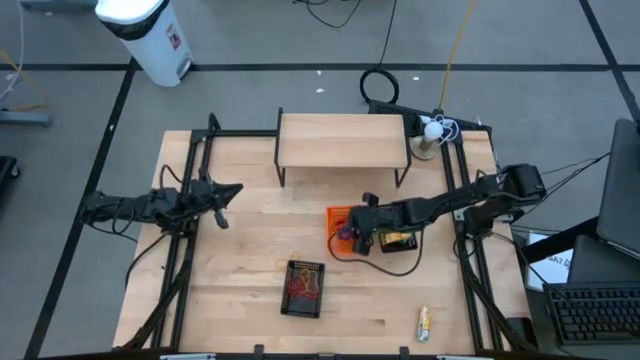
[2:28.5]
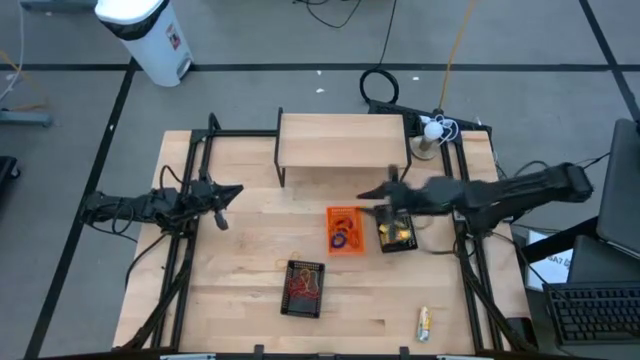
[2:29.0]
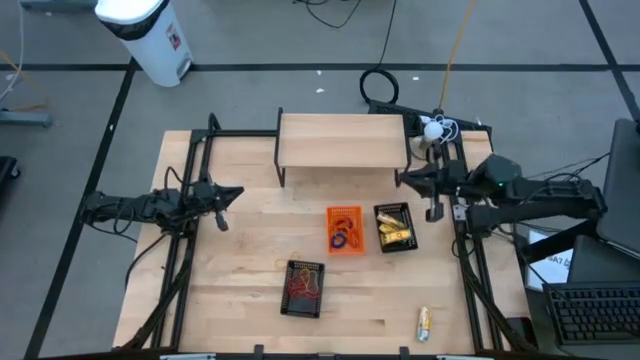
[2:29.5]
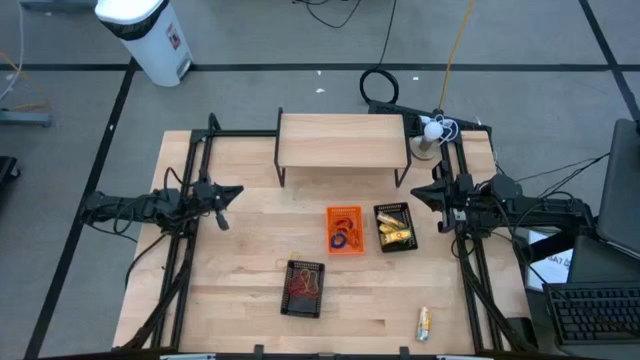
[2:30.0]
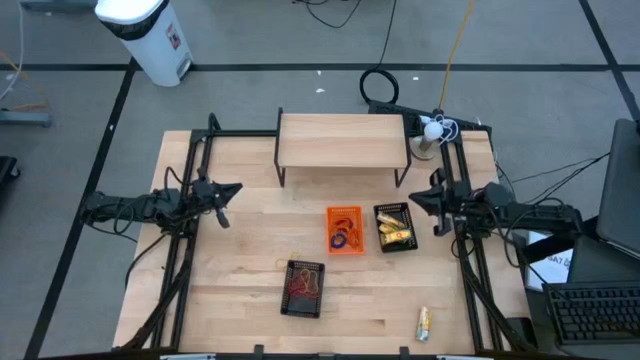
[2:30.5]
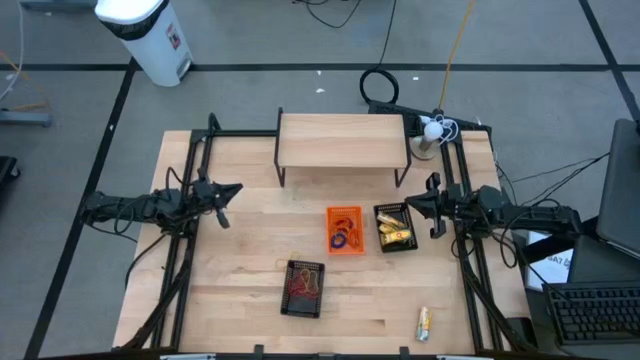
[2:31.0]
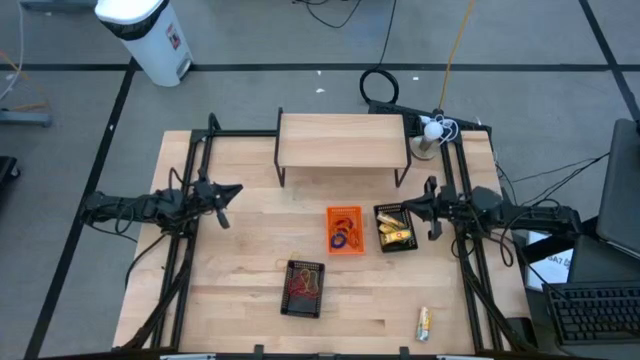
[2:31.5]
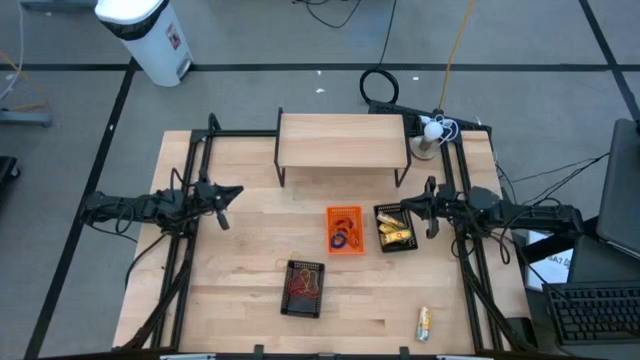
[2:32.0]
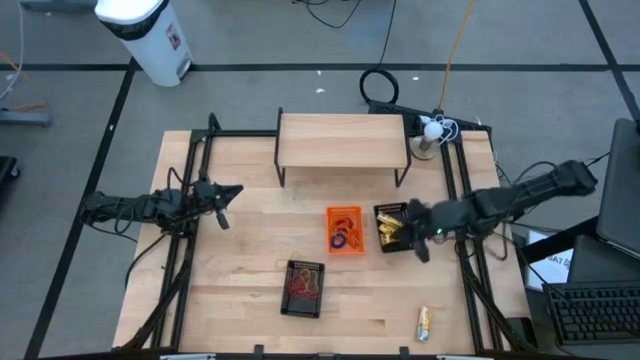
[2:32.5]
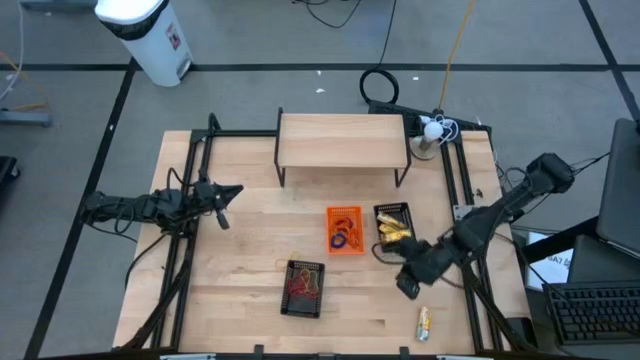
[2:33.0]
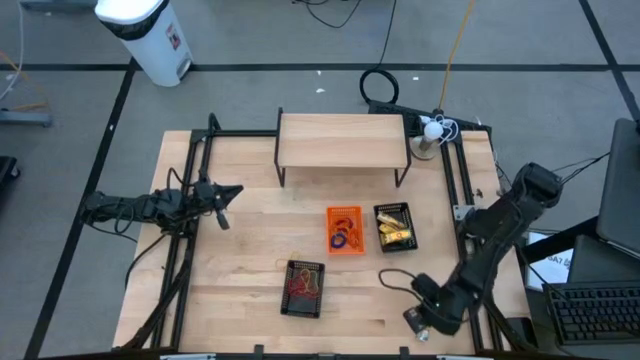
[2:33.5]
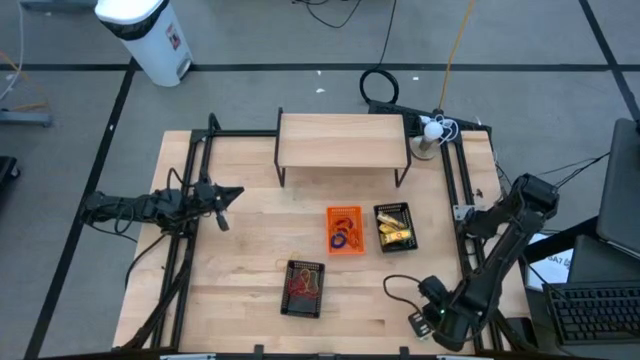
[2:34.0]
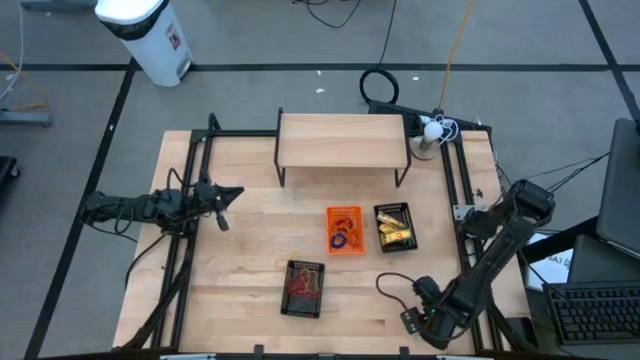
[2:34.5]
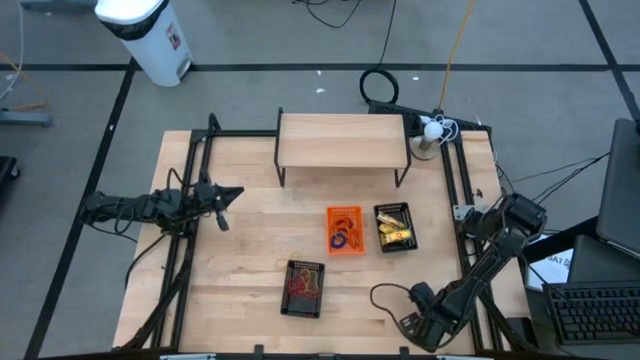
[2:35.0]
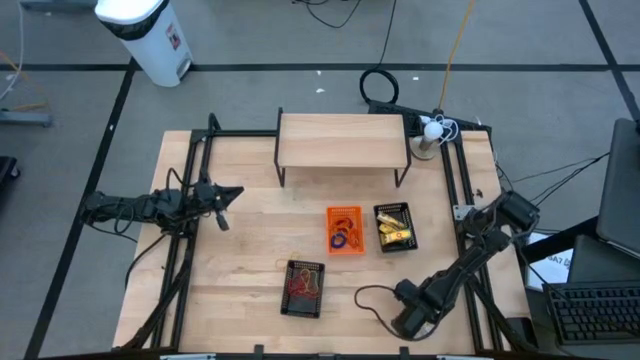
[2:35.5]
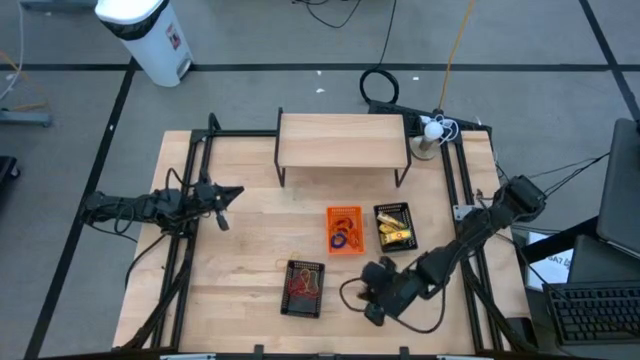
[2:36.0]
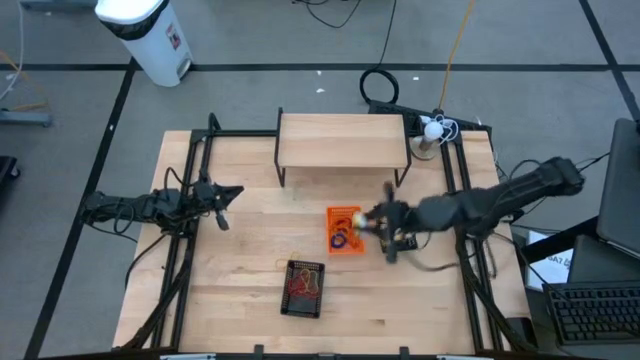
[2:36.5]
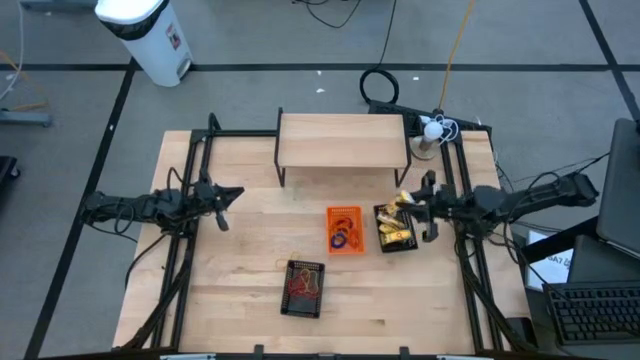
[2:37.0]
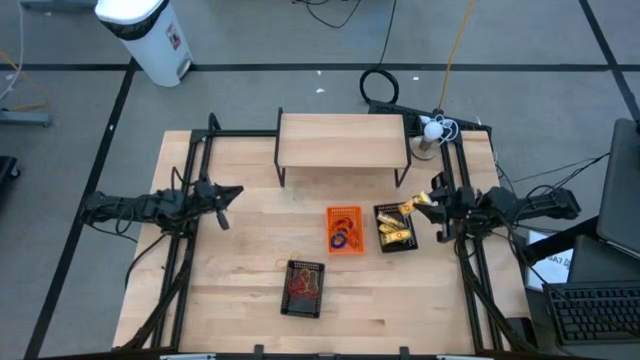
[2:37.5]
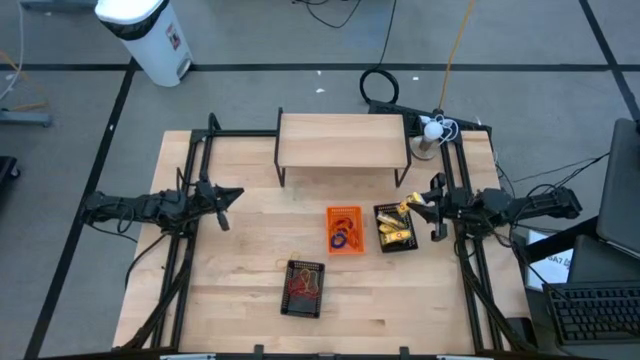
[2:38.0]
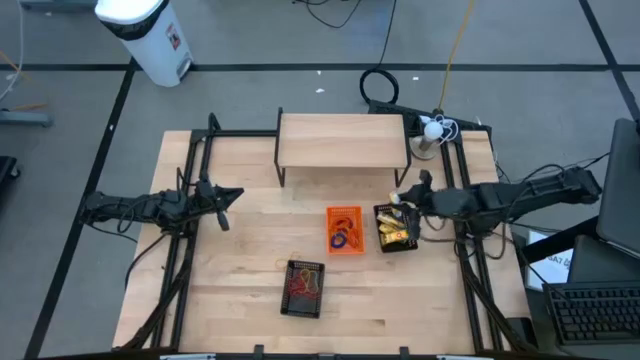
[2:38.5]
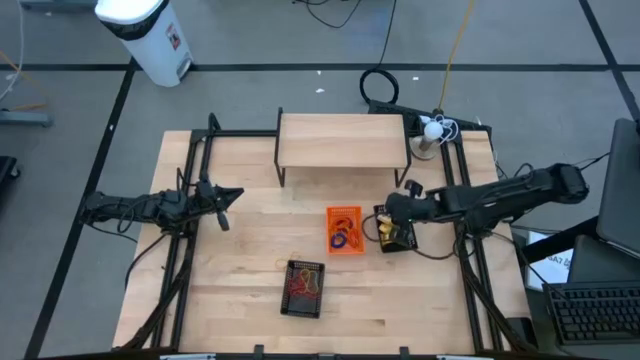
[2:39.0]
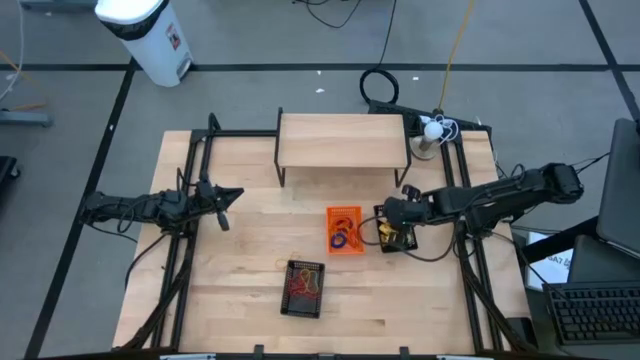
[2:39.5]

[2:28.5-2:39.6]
Task: Pick & Place Office Desk Supplies
Put the yellow crayon box into the top black bin

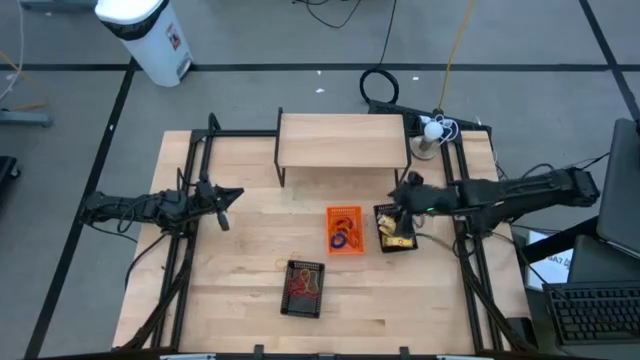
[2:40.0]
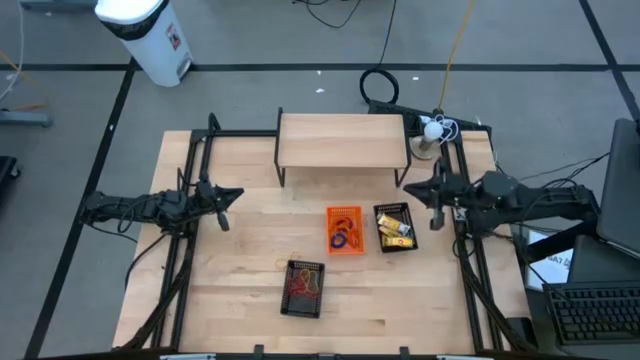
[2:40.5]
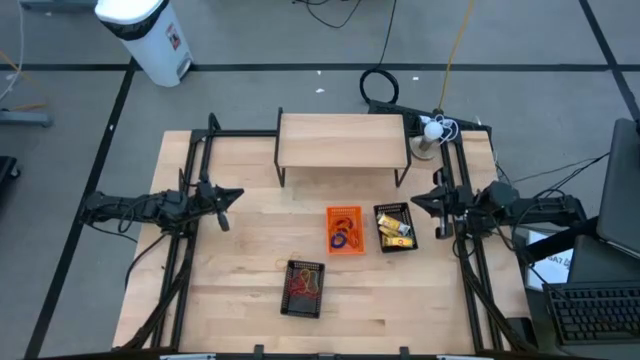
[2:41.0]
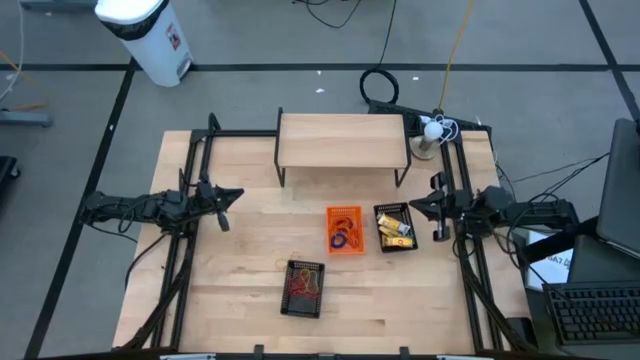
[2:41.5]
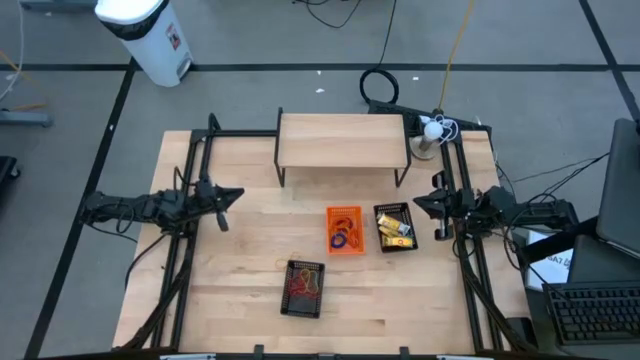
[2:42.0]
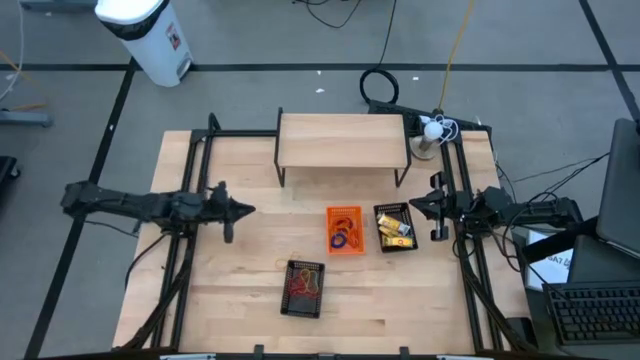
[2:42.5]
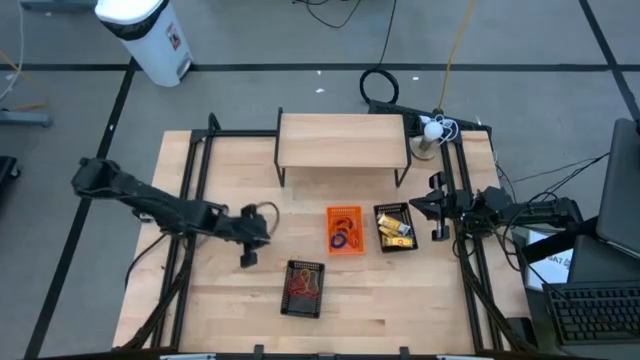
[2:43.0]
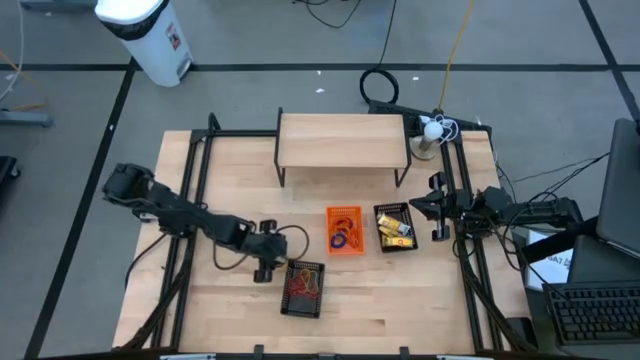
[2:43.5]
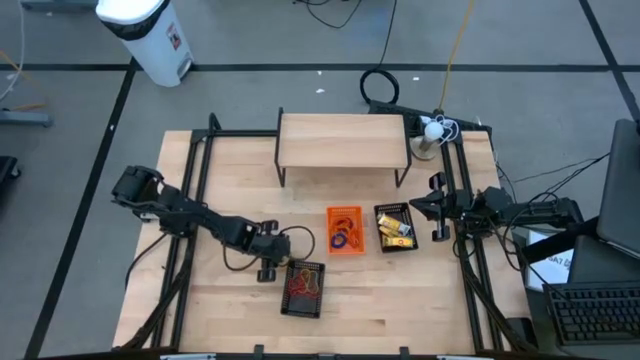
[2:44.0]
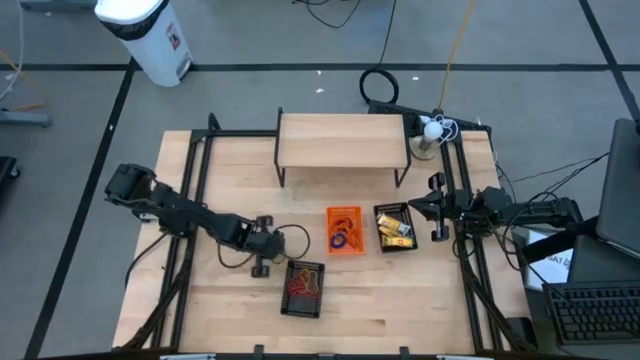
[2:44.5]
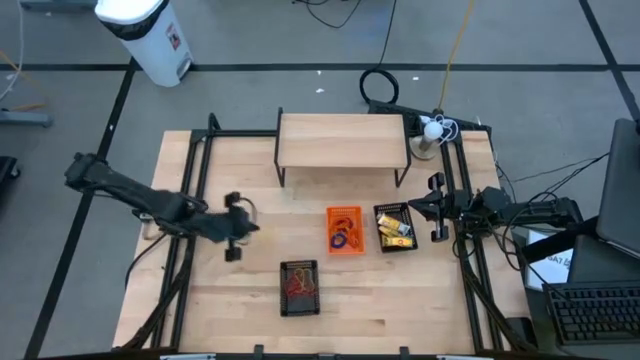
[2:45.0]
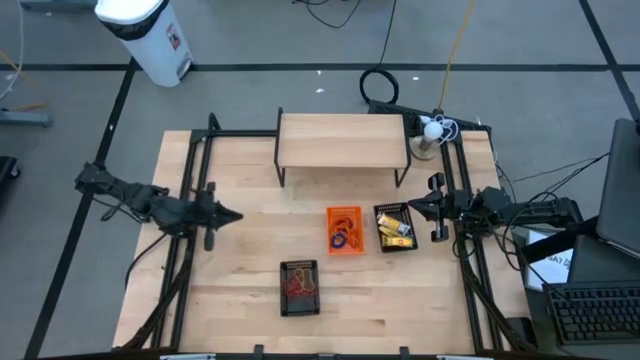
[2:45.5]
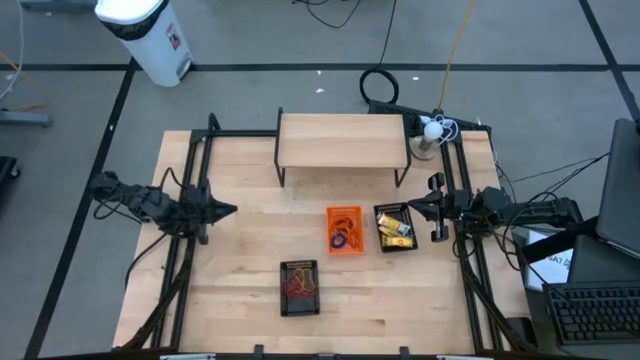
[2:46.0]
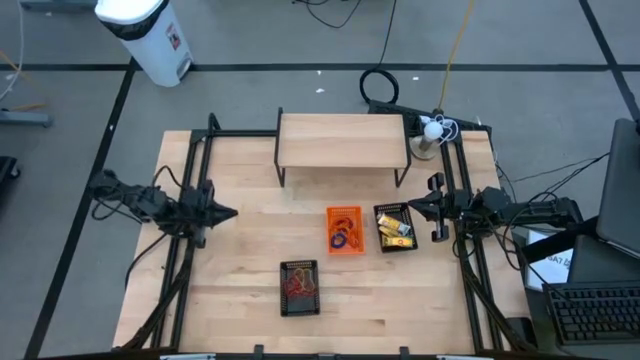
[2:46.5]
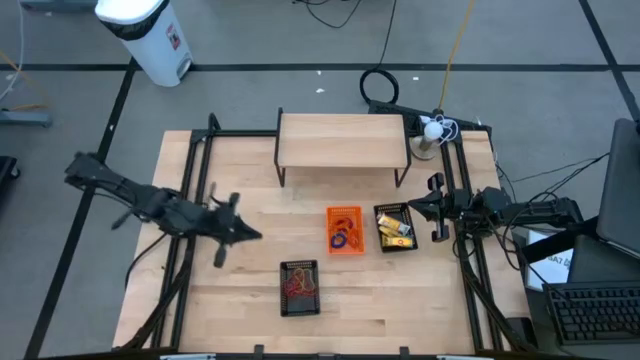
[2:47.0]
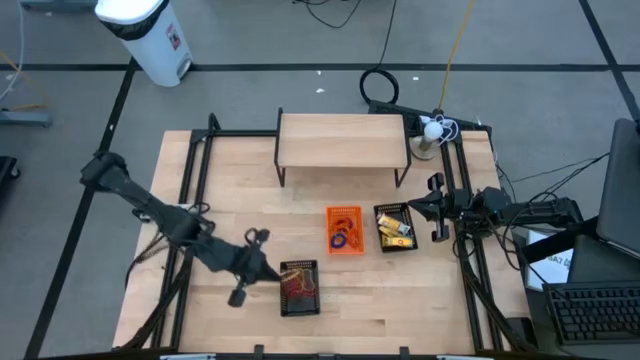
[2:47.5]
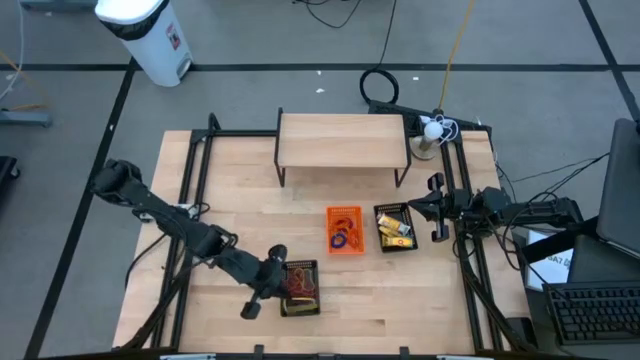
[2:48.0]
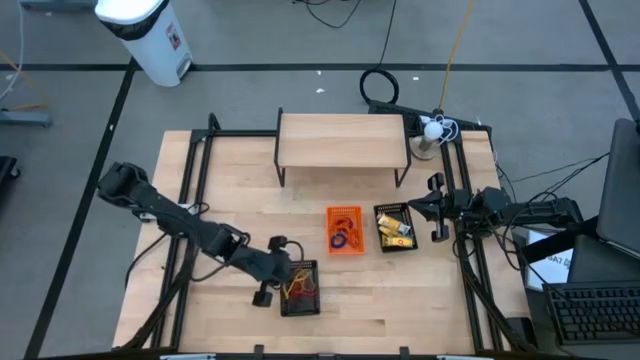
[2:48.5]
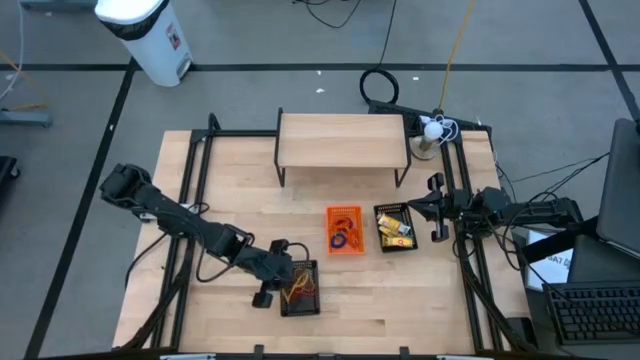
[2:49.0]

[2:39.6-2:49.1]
Put the yellow rubber band into the bottom black bin
